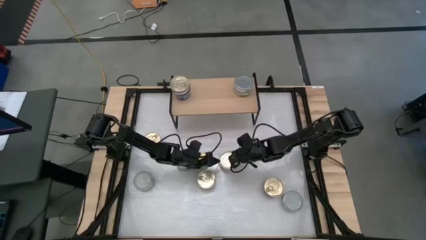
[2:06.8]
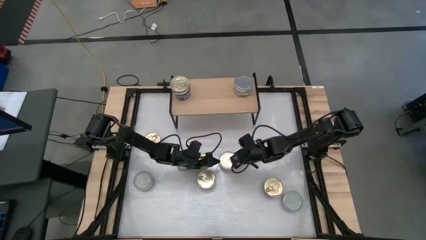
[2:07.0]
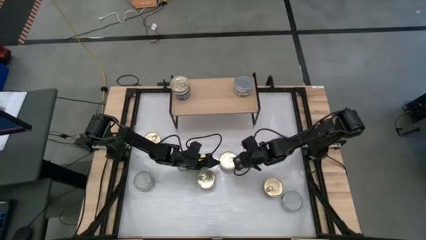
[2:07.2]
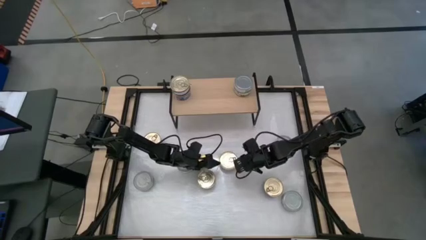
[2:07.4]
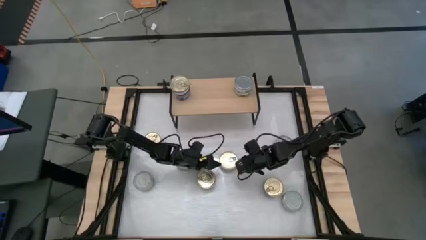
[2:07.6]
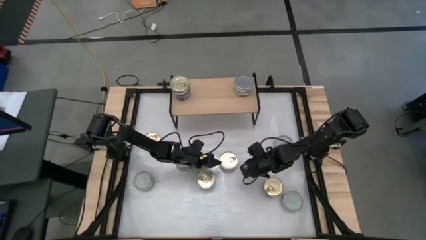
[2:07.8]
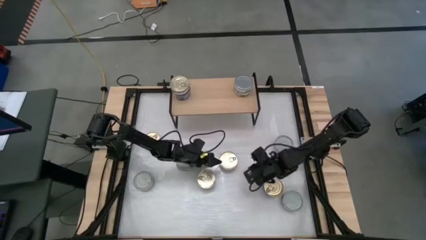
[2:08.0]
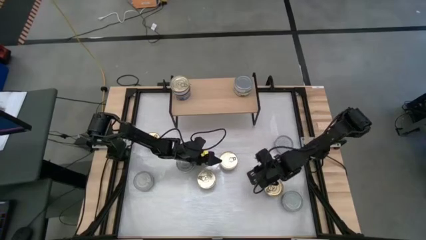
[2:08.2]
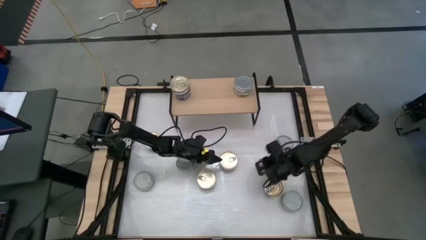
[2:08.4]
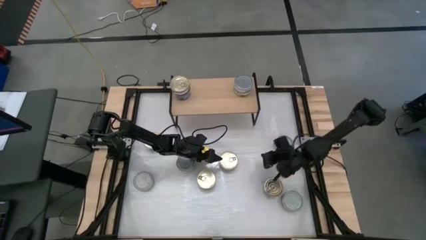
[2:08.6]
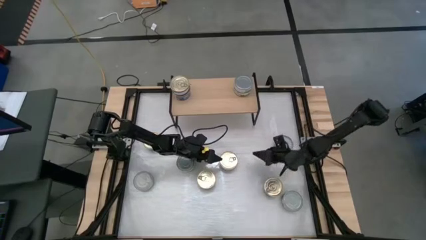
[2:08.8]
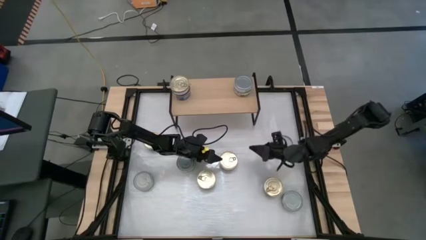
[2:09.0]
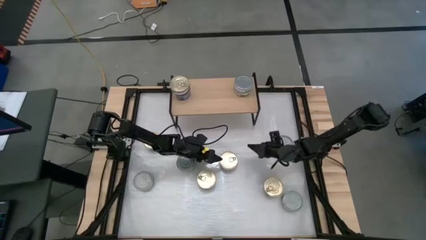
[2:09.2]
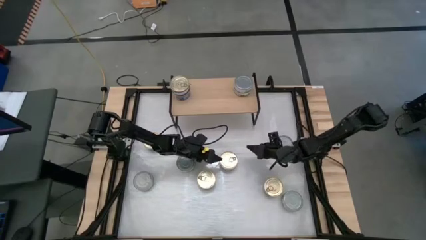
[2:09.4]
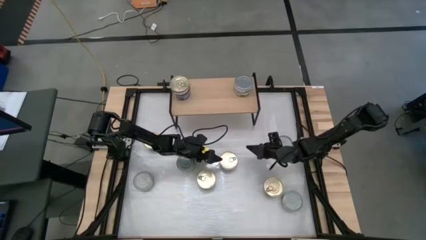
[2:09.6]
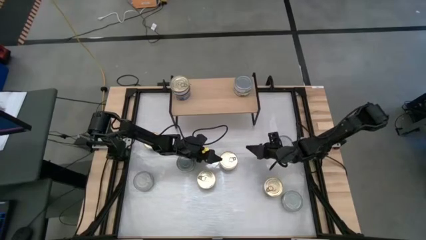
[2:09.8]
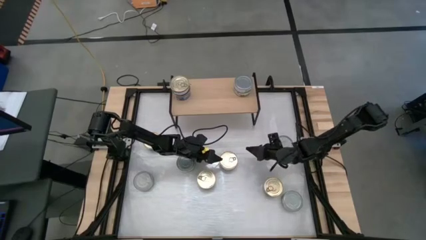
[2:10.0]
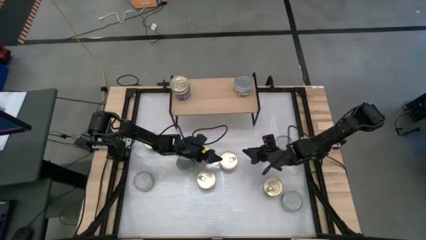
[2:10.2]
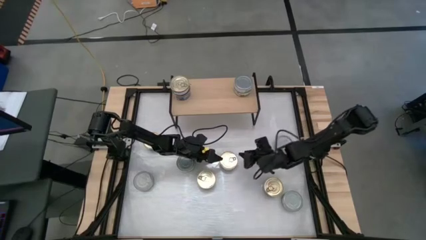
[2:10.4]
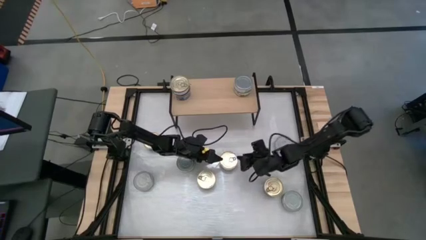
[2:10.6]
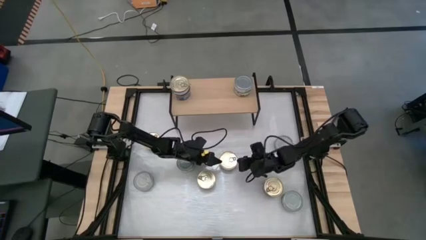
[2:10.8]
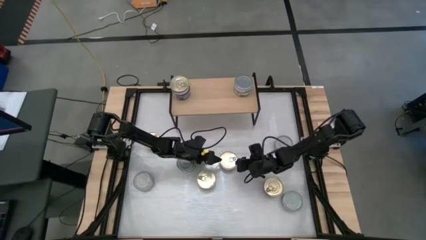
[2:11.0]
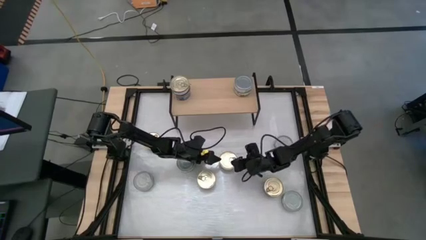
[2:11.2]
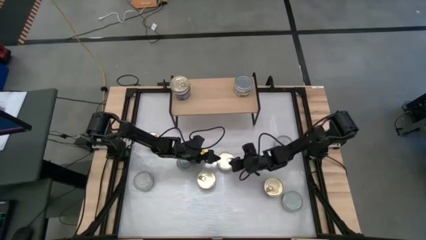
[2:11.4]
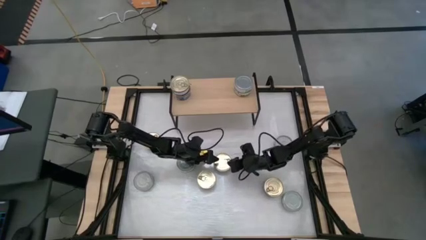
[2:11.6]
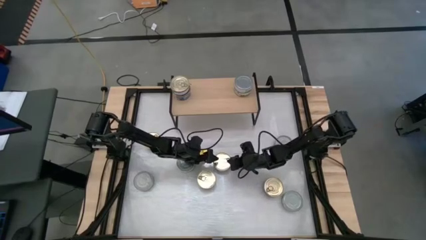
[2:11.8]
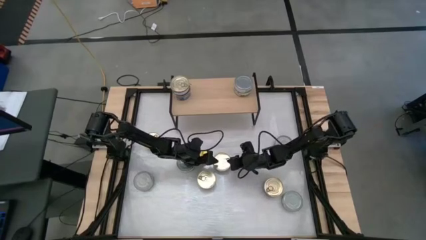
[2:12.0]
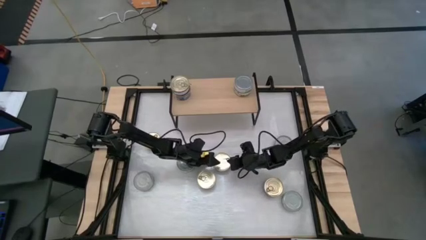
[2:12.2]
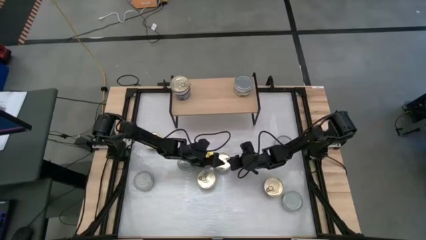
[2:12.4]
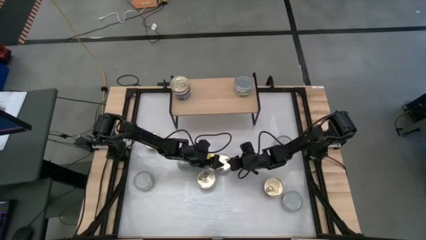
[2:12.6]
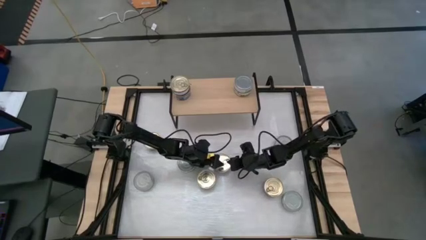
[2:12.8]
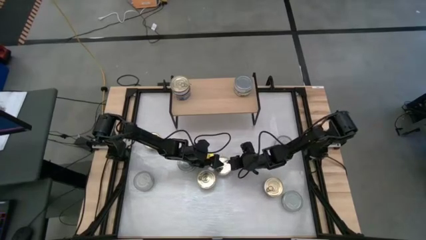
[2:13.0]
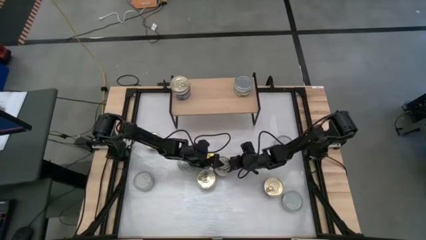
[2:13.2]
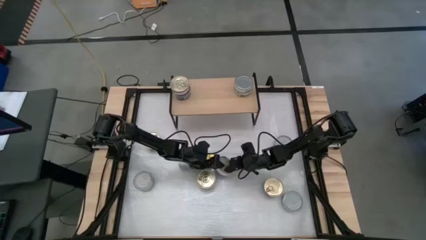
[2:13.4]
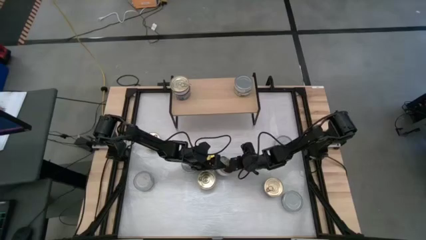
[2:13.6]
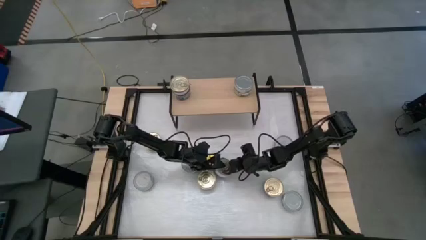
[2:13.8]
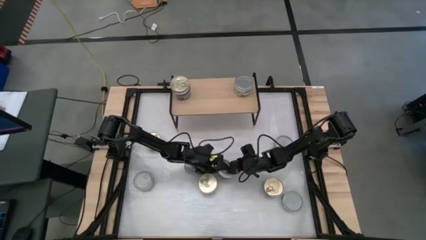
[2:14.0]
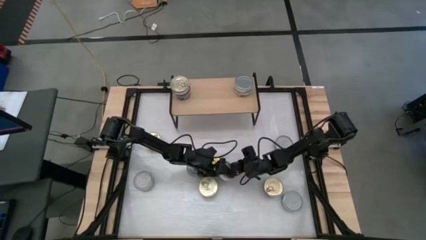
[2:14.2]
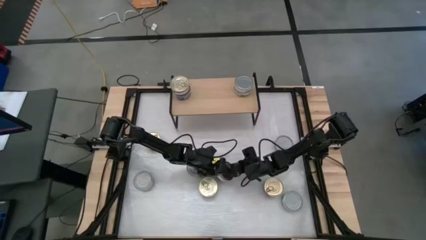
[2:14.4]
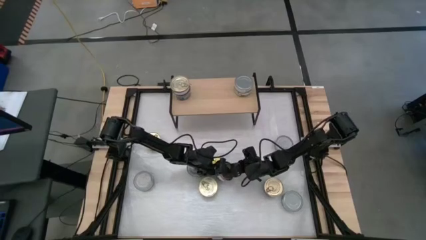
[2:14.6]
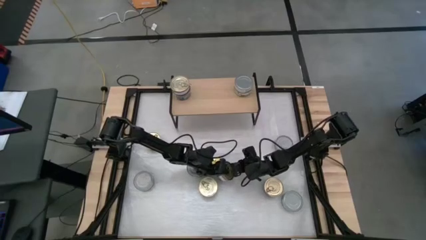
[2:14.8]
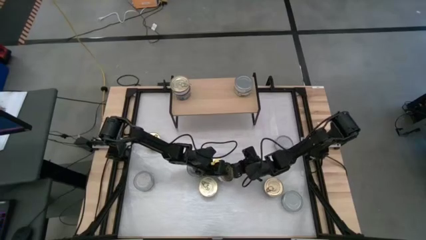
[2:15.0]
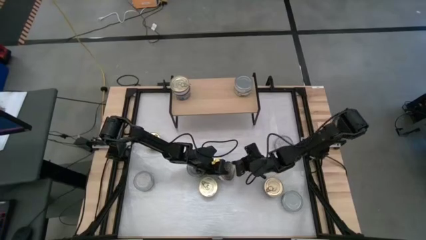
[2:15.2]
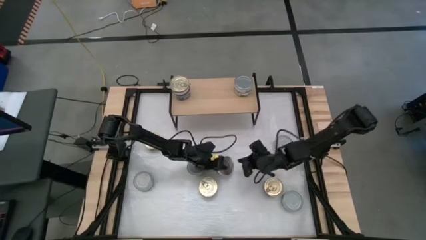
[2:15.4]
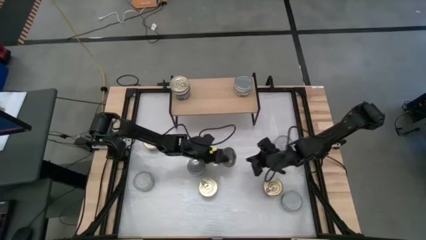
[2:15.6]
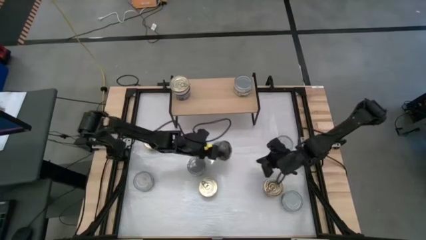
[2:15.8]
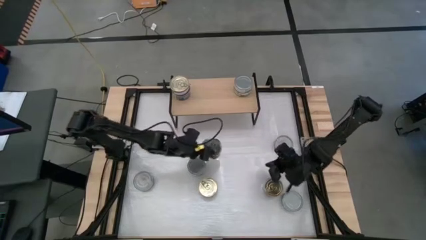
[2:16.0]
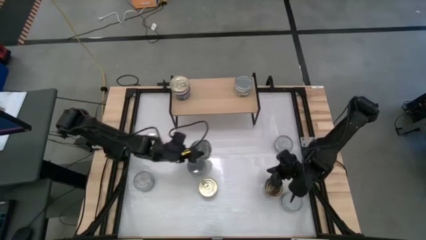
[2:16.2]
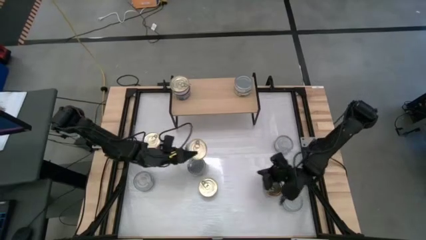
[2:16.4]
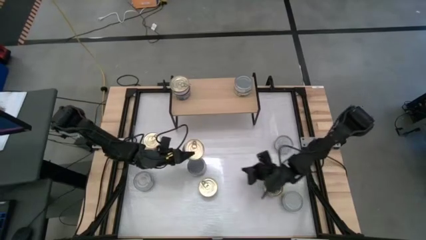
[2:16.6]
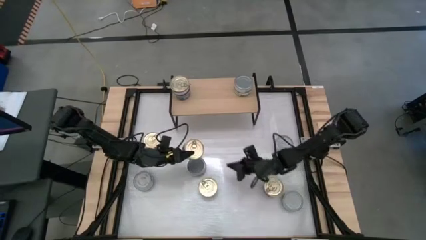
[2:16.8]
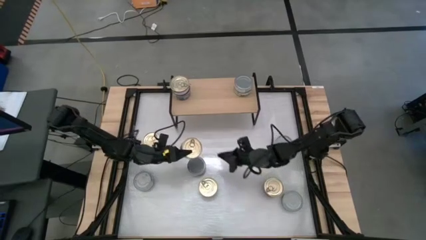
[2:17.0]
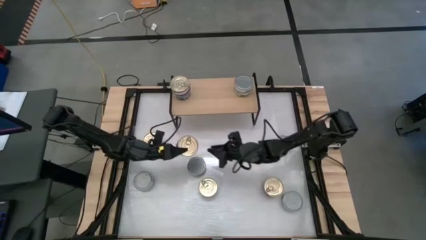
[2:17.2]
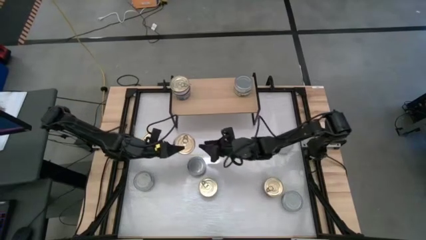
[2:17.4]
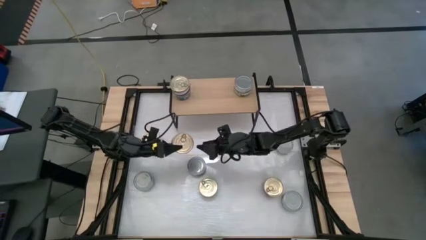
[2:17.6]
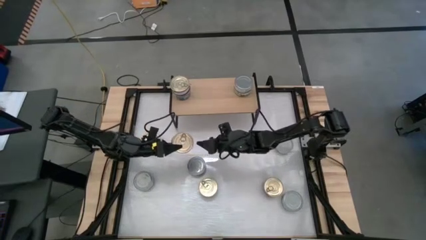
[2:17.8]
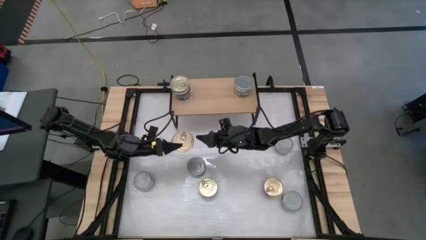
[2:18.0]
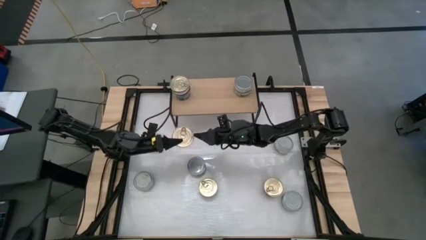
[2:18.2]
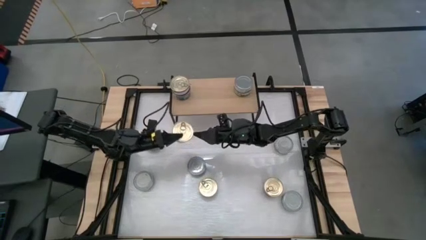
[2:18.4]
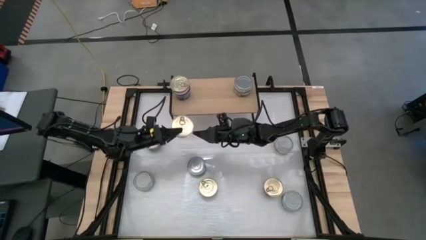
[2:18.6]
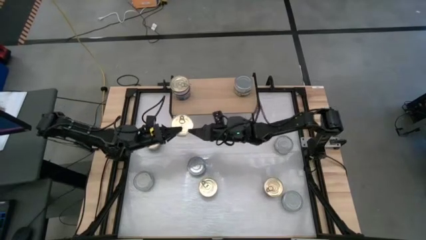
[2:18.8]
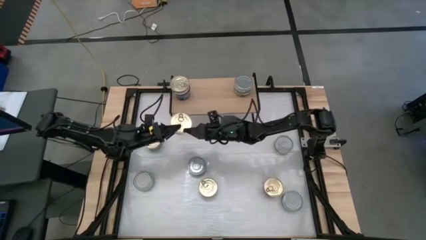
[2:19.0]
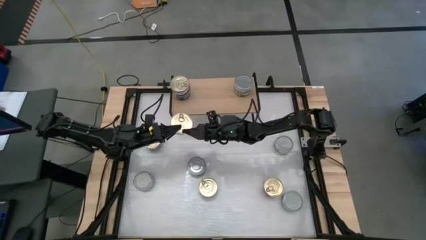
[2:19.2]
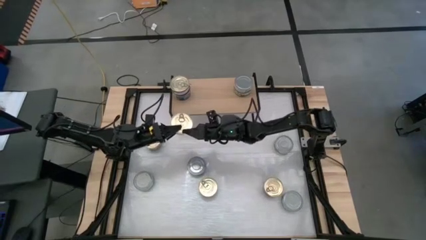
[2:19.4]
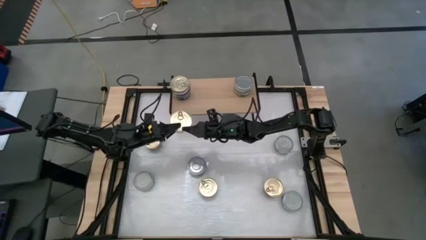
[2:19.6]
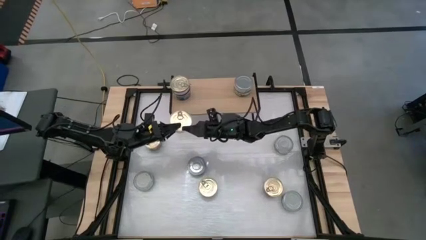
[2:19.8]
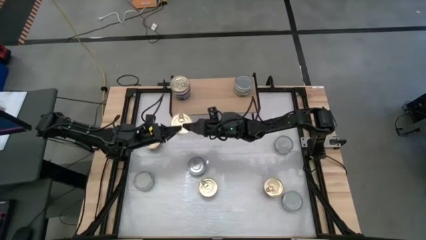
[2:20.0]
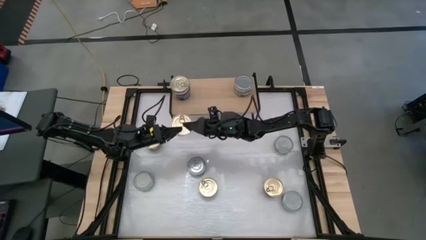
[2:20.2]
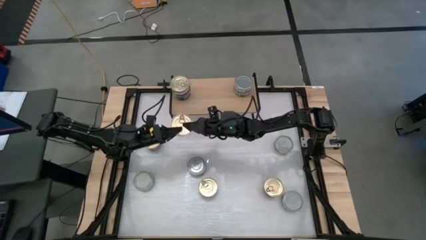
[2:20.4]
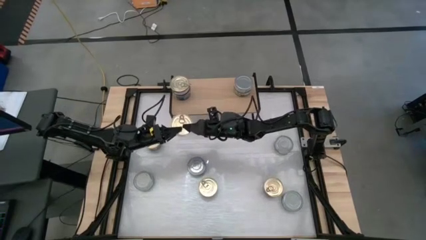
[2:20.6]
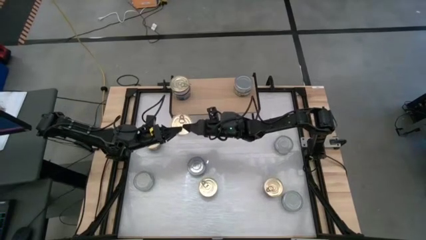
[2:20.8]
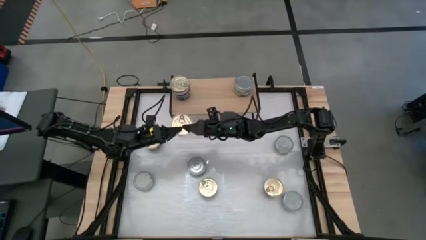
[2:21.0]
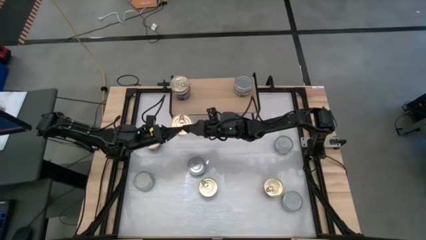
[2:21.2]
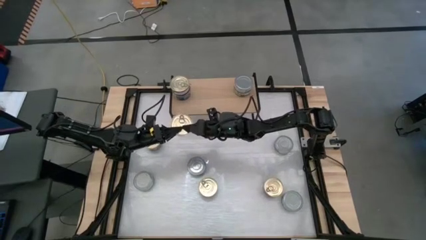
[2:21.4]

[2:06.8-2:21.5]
Task: Stack canned seafood by type on shelf
Put the blue pink tuna can on the shelf aligned with the stacked blue pink tuna cans
